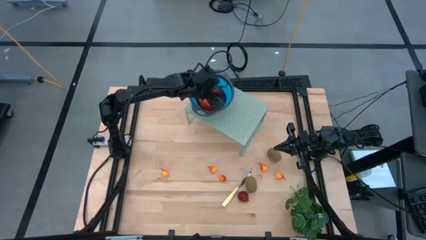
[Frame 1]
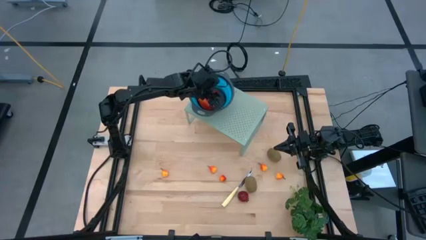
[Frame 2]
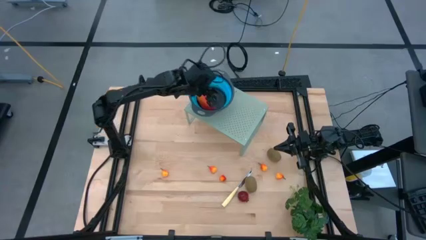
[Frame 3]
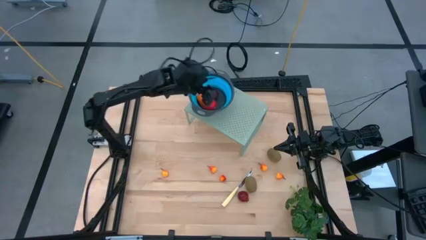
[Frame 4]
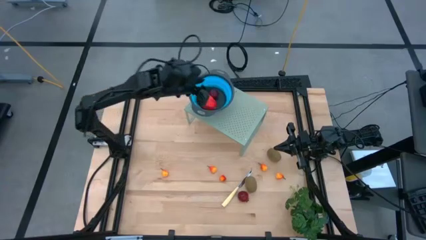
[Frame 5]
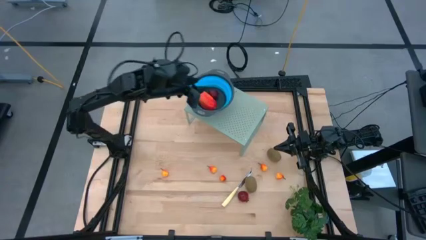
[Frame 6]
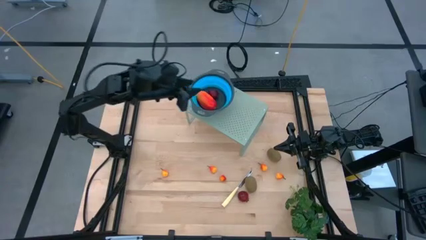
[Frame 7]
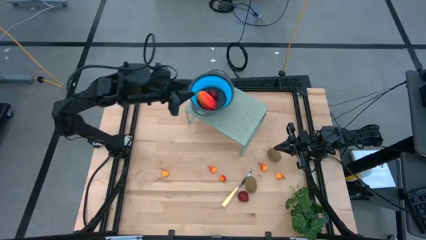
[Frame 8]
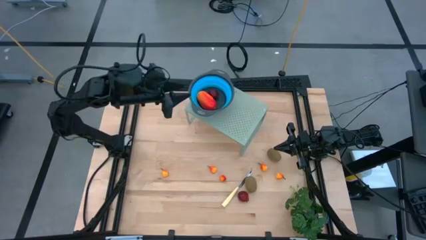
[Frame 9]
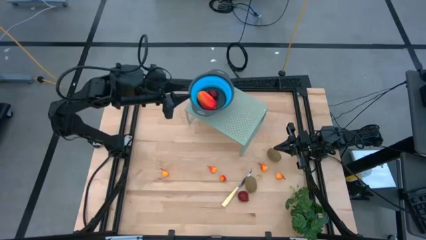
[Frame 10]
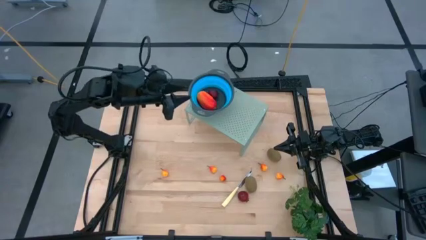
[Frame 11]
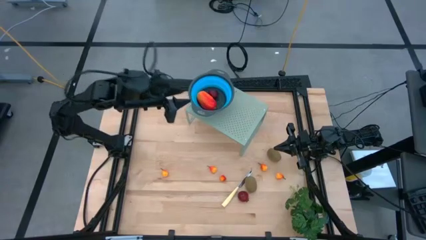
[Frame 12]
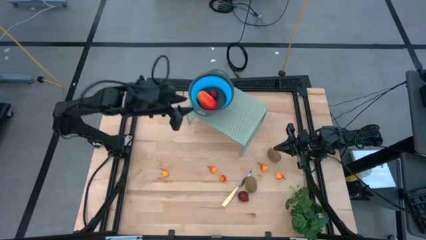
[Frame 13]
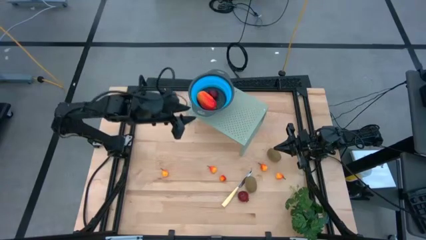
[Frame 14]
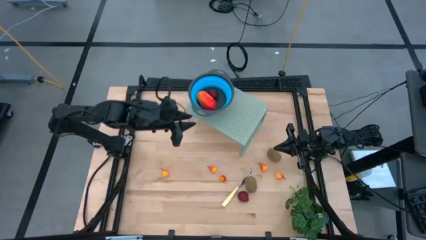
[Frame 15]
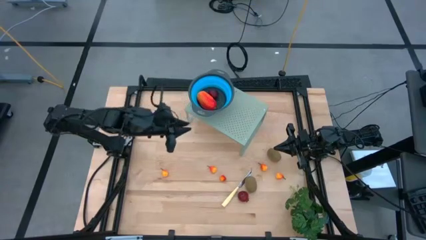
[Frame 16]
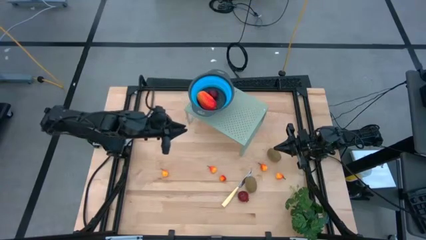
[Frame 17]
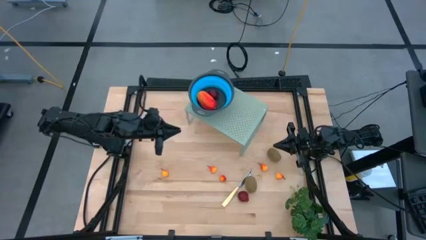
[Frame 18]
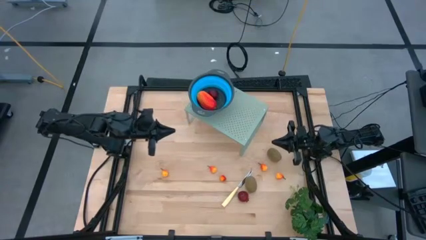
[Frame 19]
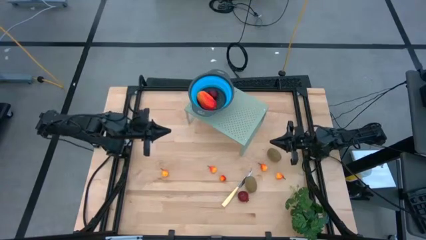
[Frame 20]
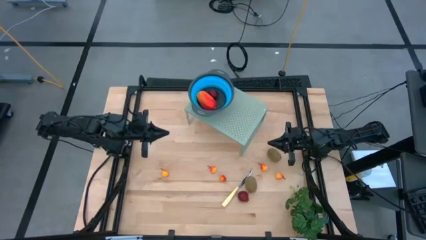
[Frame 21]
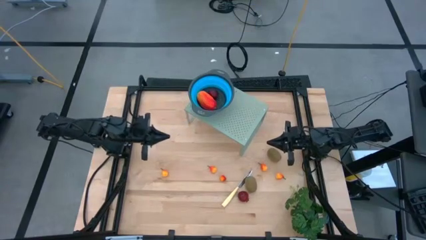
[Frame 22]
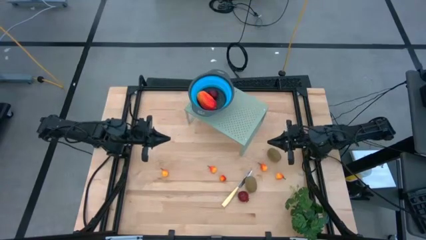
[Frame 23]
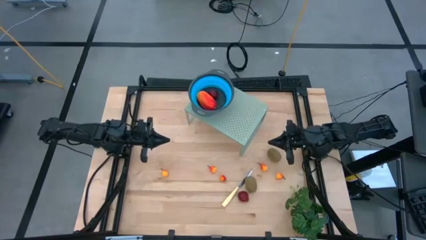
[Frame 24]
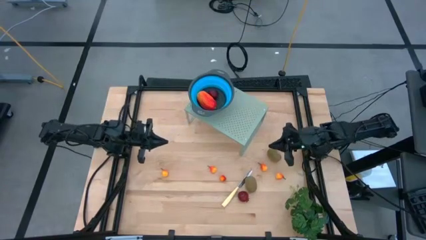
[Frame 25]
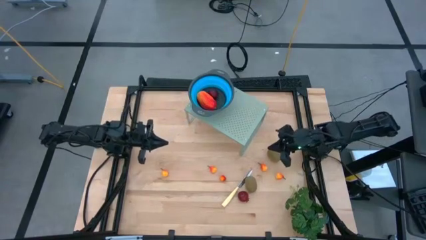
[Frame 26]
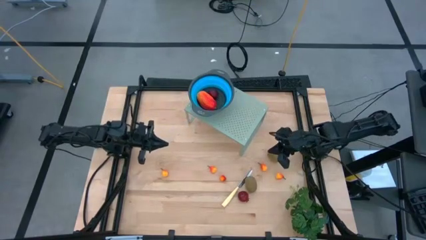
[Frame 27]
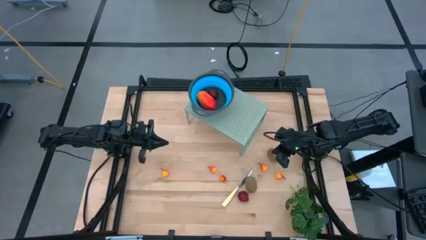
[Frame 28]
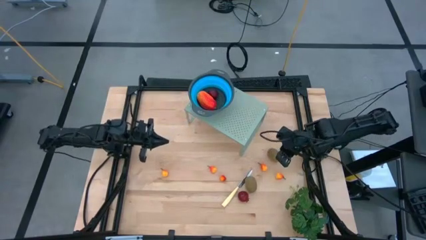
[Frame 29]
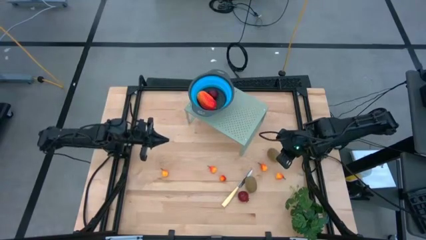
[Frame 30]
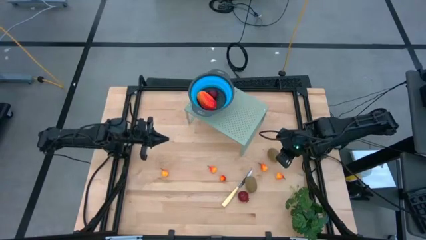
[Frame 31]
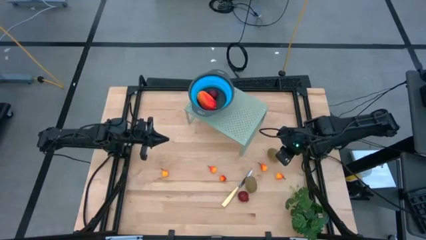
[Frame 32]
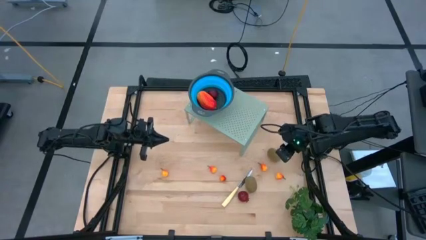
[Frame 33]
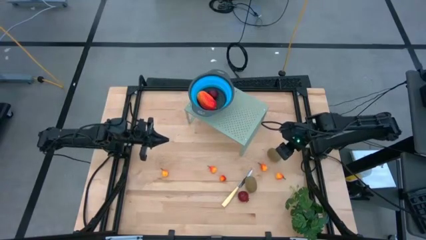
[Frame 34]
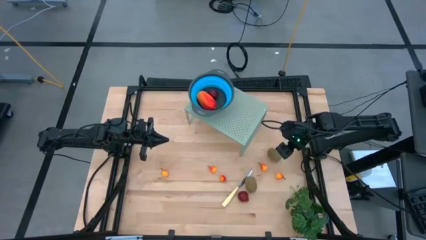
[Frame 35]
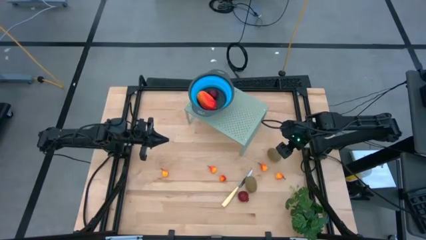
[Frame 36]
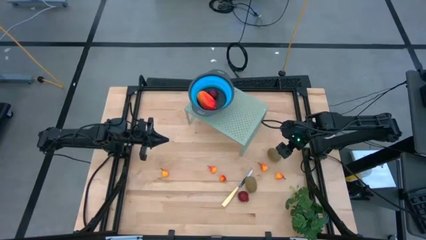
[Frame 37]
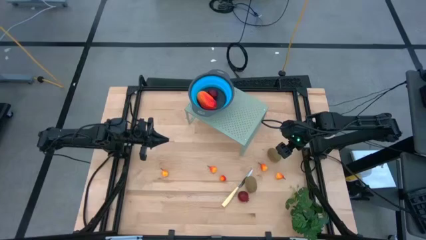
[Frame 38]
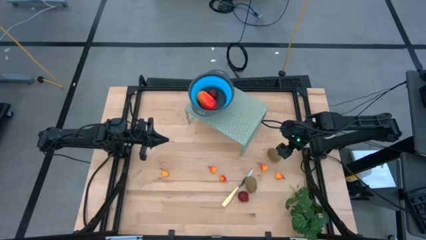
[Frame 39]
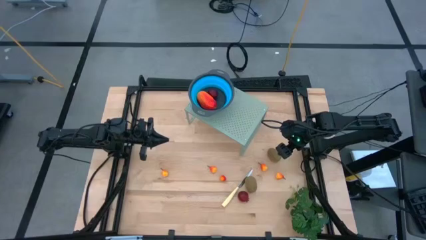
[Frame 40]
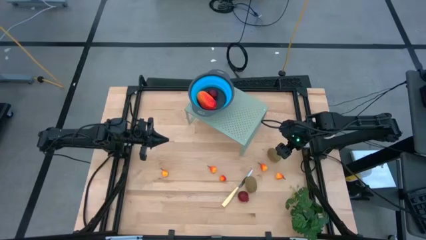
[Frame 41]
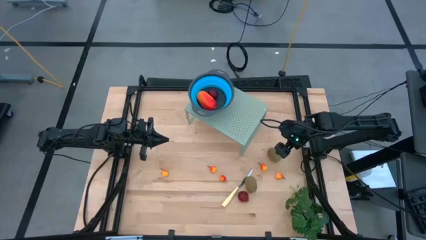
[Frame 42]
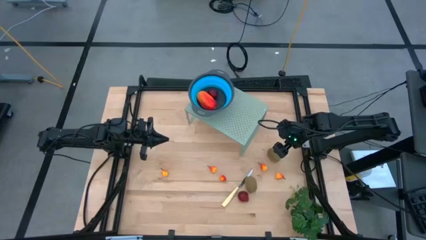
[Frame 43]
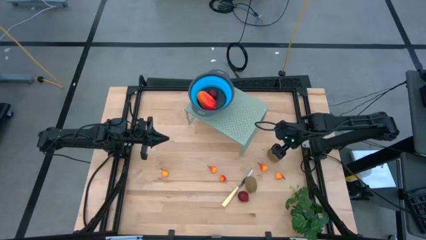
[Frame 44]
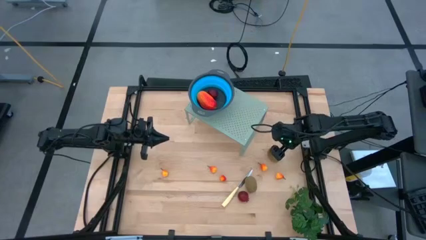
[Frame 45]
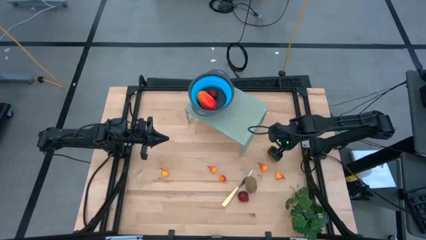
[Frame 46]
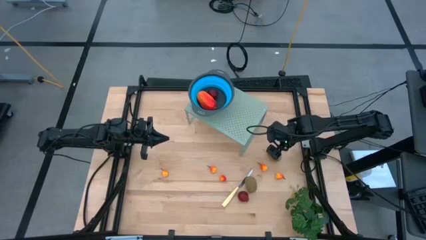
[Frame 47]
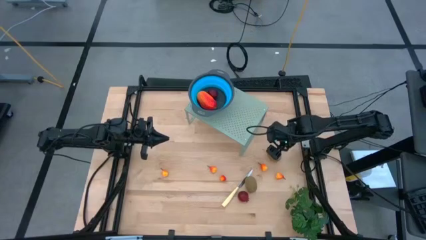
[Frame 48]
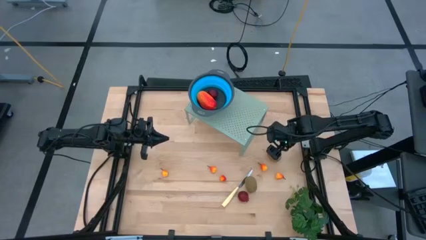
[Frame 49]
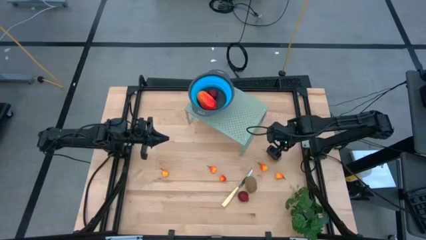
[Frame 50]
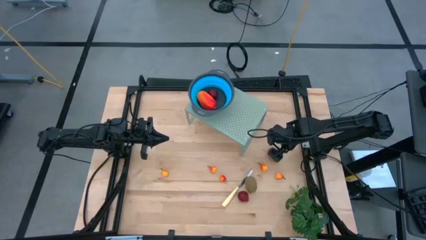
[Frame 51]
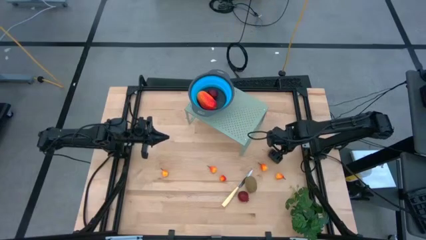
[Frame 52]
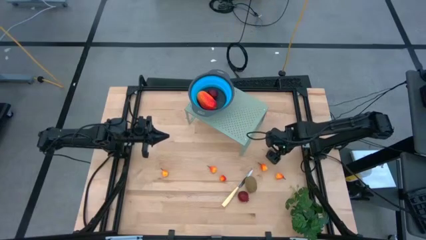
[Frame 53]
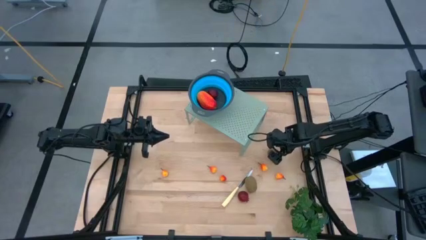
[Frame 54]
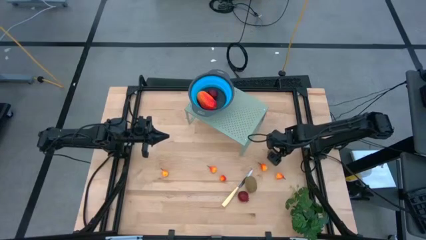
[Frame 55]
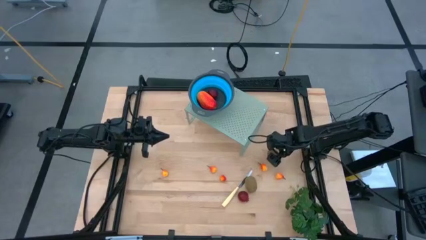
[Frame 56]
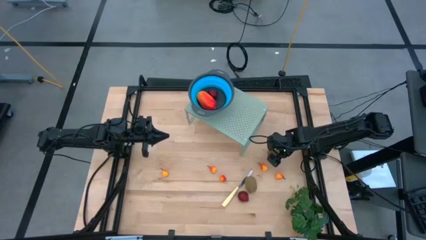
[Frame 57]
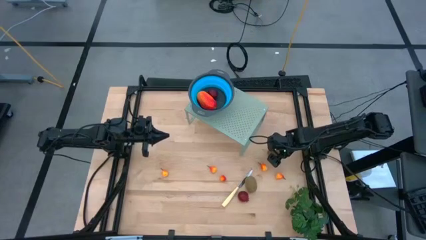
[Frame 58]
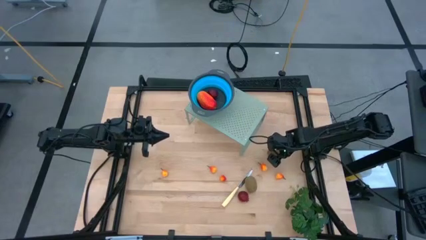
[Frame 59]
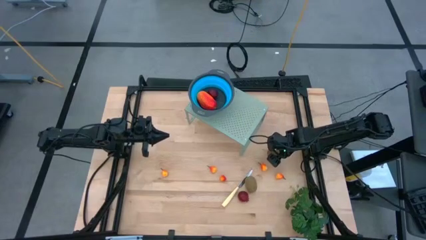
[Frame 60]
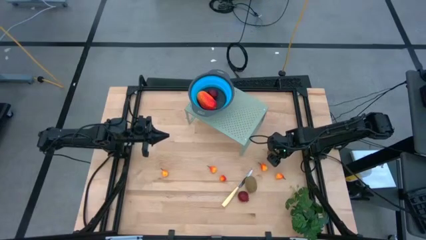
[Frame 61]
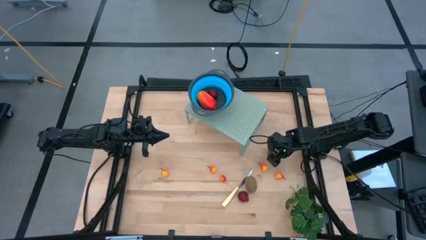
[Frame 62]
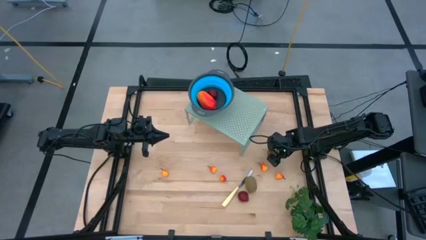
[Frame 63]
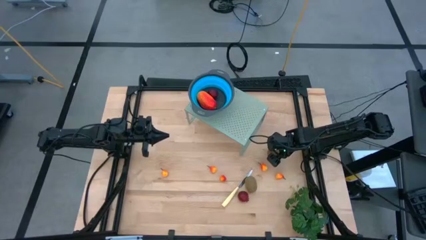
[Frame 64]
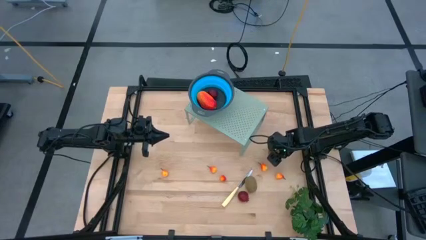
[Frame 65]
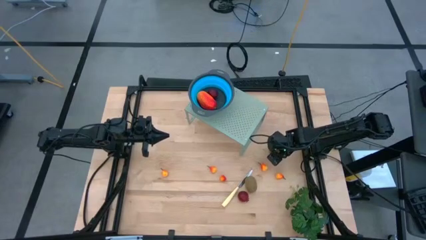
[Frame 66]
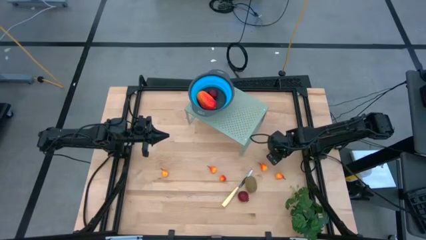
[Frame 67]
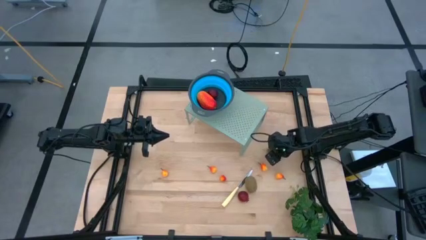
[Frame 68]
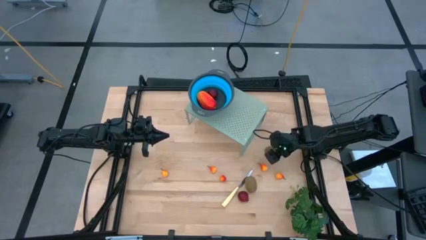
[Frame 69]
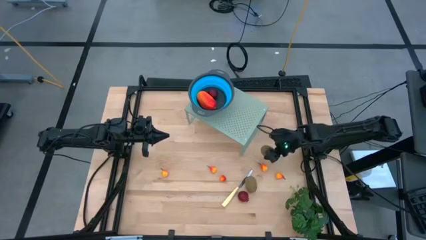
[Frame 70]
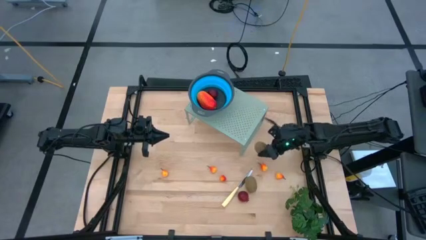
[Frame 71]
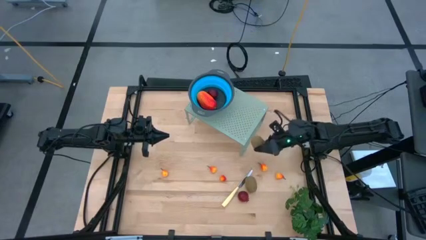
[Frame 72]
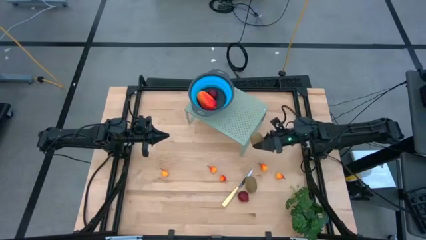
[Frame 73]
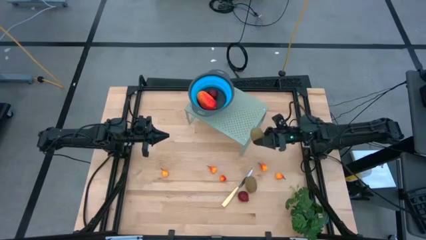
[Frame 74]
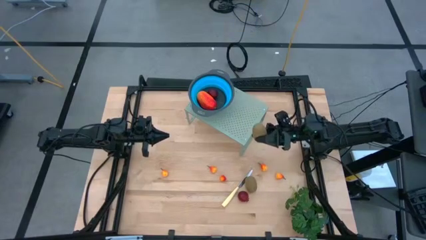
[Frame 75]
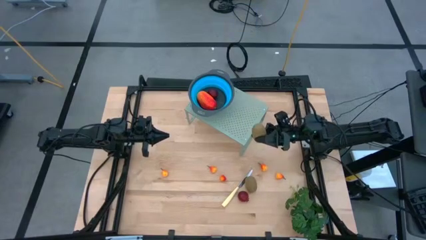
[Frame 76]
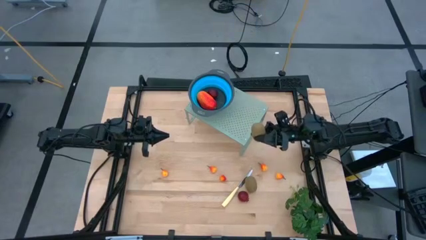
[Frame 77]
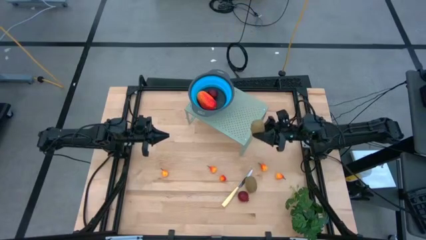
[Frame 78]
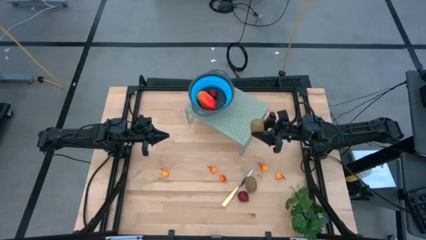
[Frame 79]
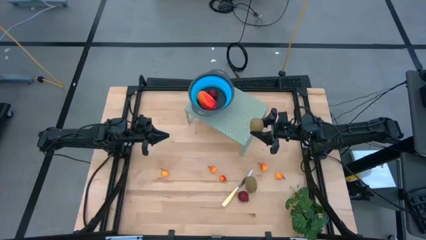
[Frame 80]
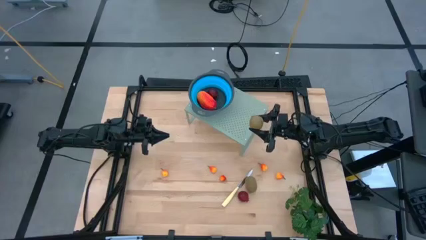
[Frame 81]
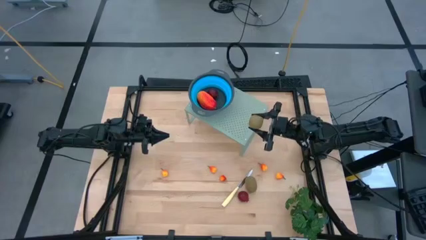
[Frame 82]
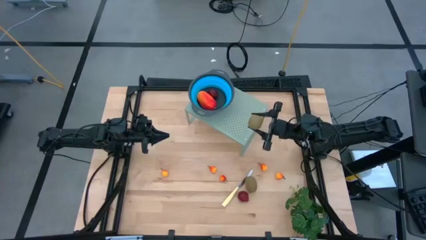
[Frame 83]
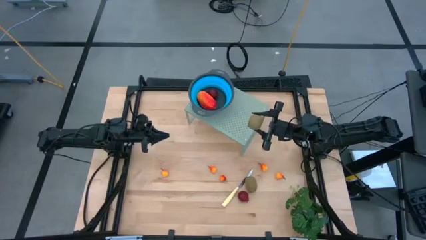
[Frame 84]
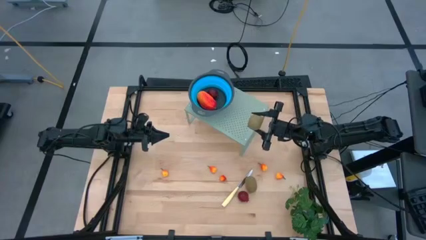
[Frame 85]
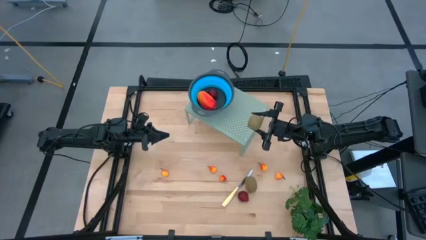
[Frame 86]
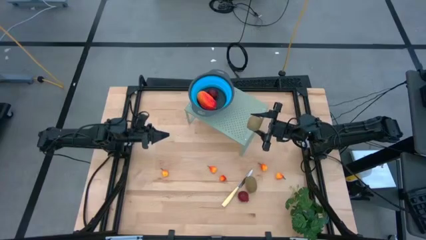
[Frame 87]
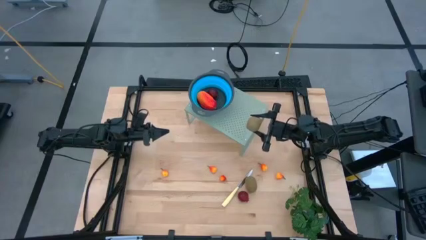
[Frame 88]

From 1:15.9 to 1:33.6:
Task: Pick & Place Fruit
Put the kiwi into the blue strainer bowl on the shelf
